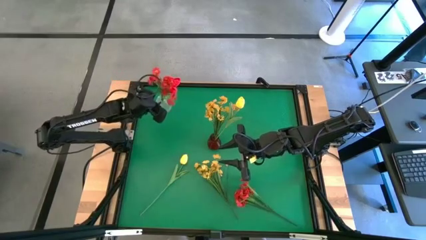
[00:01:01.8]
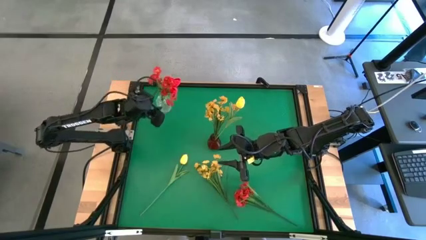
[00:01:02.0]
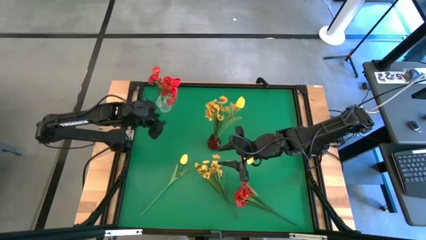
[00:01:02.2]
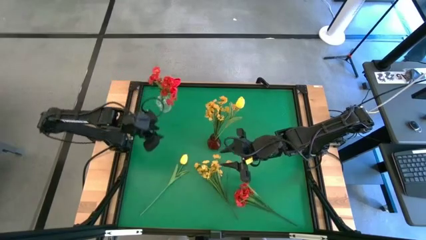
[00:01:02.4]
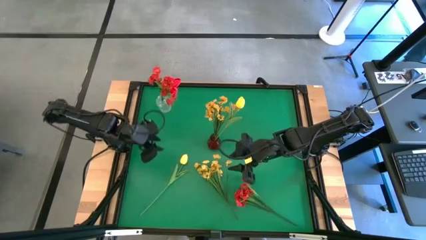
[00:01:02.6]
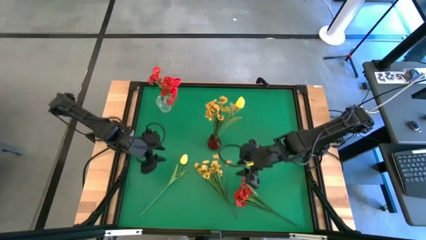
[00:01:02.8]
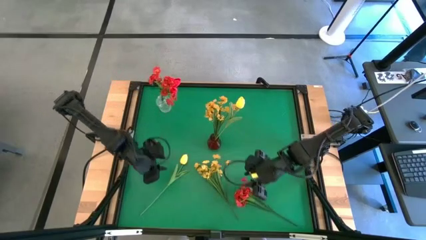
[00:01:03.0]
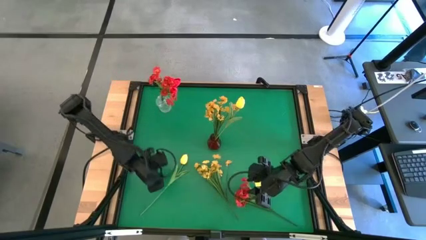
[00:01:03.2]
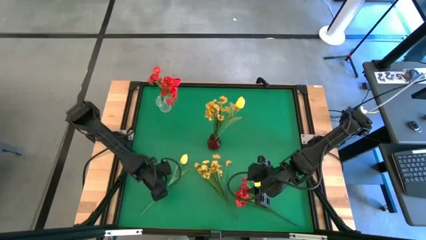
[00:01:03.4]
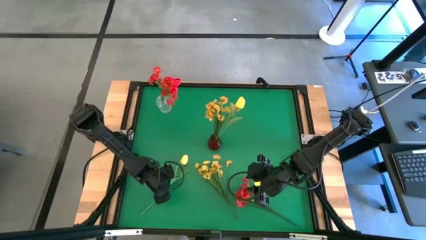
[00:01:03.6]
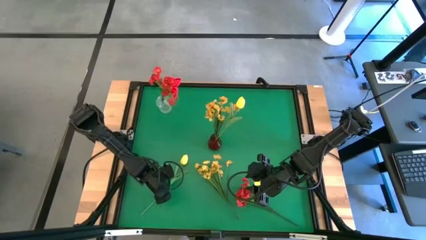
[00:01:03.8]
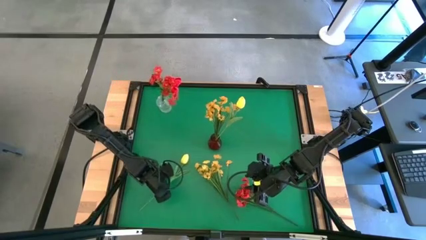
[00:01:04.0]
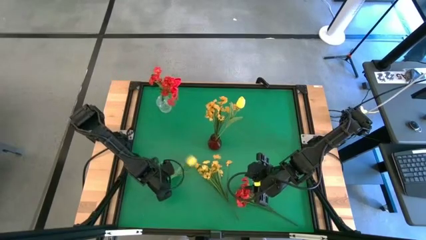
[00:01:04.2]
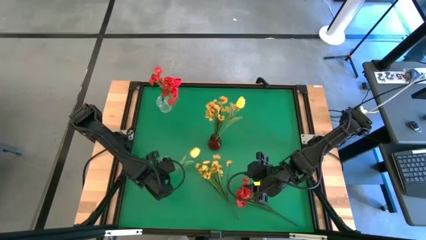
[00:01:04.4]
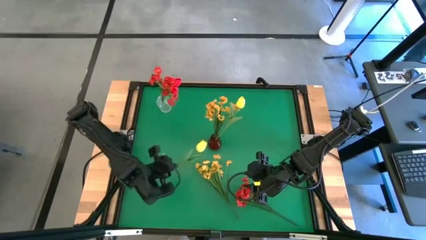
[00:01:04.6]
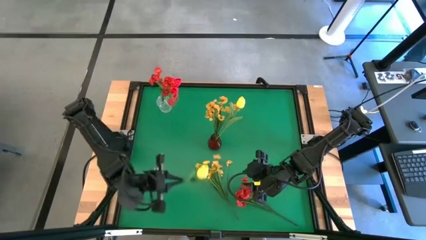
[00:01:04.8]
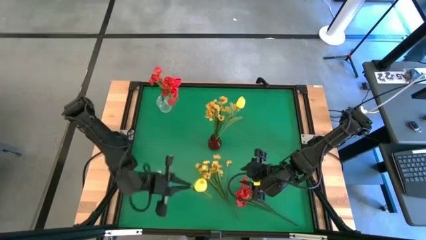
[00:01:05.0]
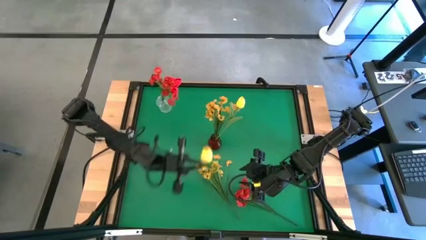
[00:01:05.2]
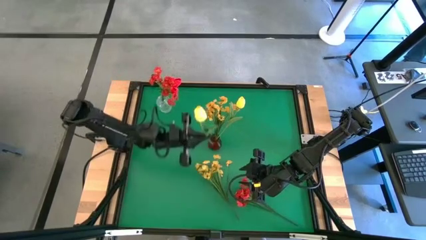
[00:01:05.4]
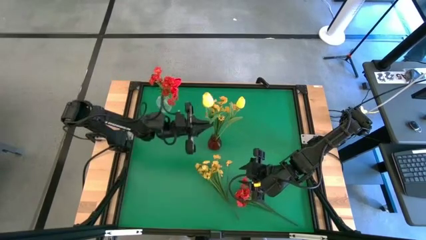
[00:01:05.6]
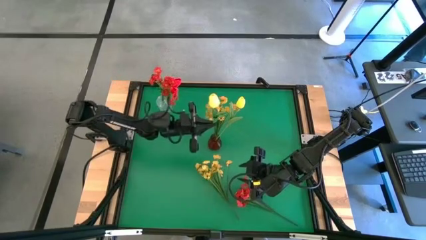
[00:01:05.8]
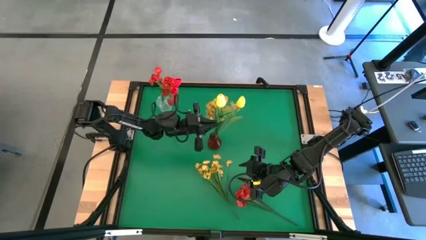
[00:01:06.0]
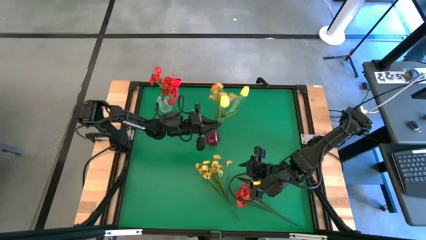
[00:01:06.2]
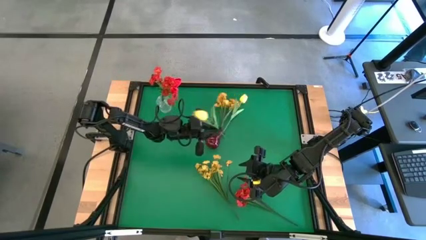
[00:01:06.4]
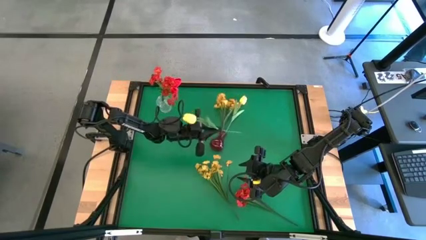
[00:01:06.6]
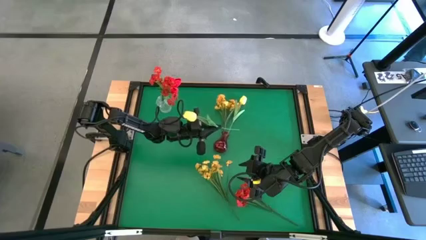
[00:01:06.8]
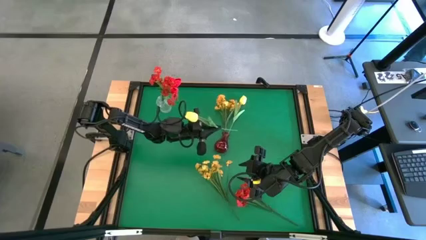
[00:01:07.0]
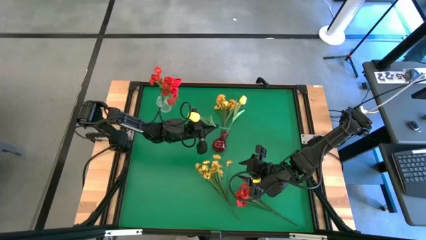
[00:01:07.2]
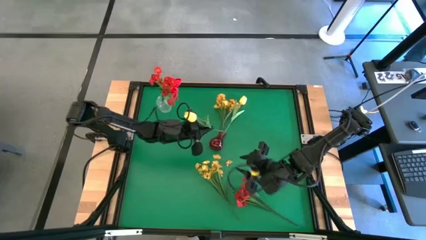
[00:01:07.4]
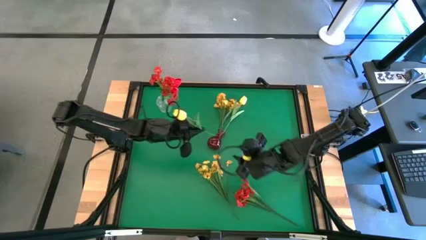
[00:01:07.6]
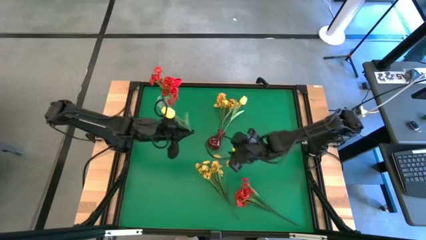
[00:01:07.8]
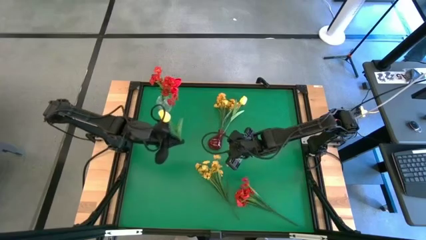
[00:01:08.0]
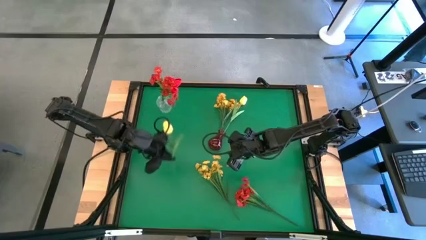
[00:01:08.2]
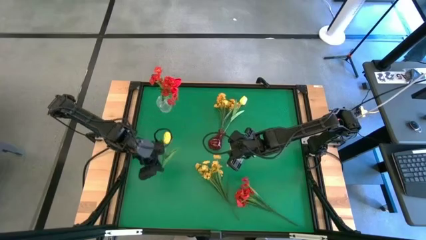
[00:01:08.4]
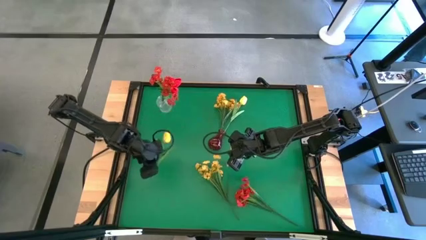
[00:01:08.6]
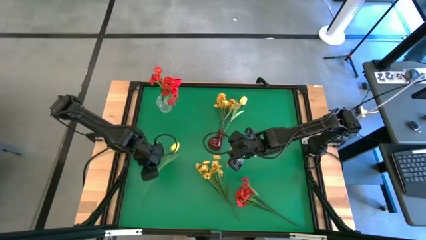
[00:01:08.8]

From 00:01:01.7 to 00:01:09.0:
Task: Sort flowers into vase by color
Put the yellow flower into the red vase

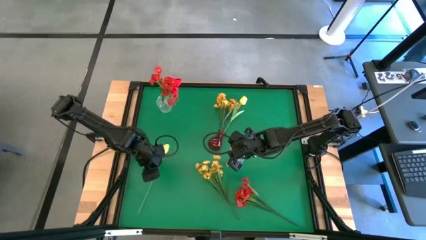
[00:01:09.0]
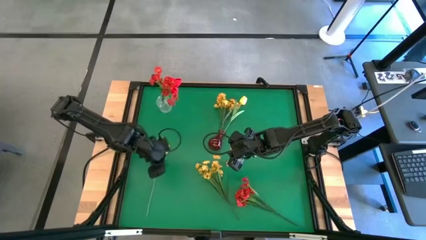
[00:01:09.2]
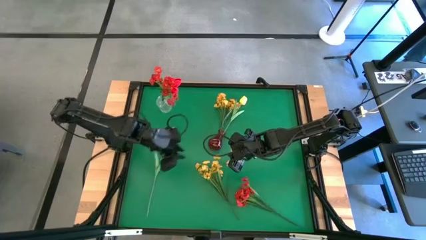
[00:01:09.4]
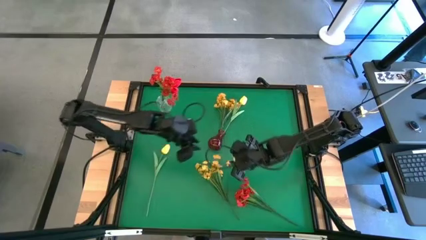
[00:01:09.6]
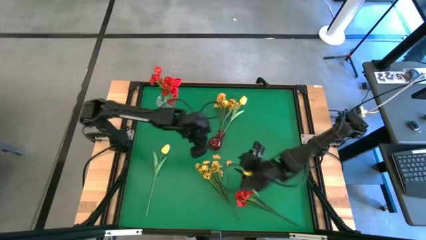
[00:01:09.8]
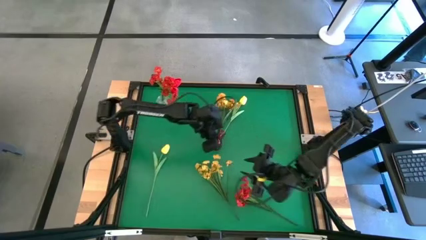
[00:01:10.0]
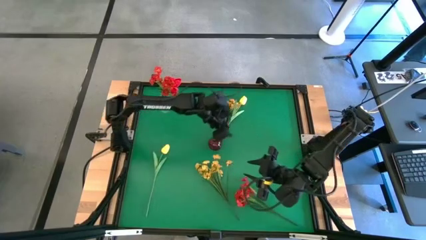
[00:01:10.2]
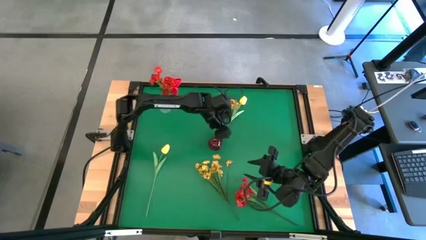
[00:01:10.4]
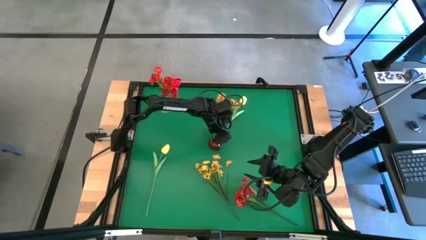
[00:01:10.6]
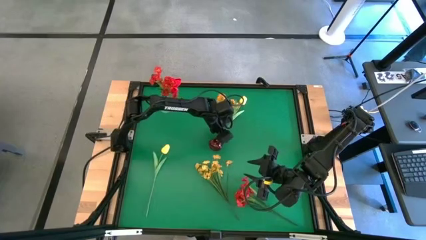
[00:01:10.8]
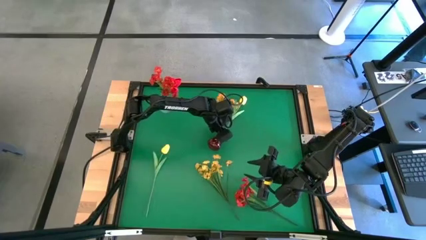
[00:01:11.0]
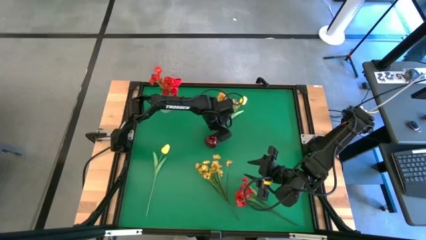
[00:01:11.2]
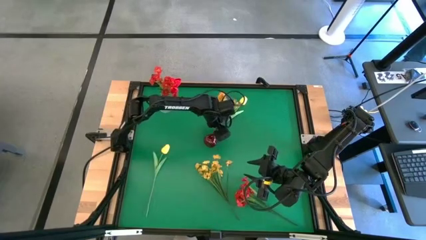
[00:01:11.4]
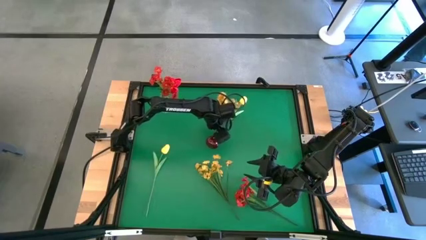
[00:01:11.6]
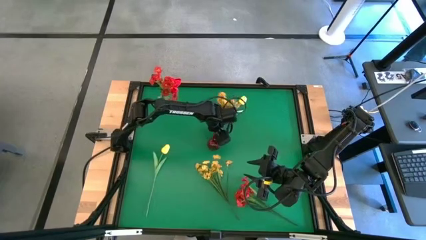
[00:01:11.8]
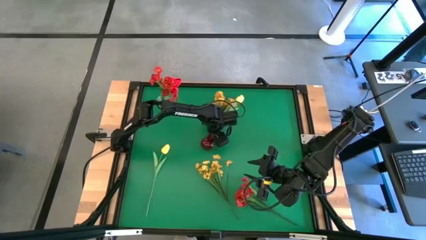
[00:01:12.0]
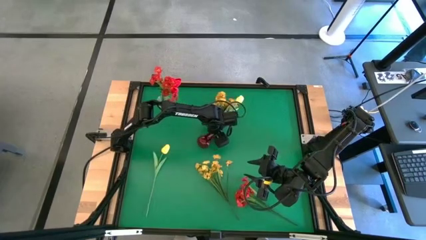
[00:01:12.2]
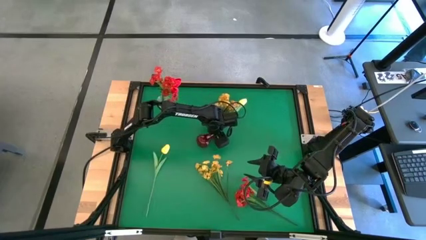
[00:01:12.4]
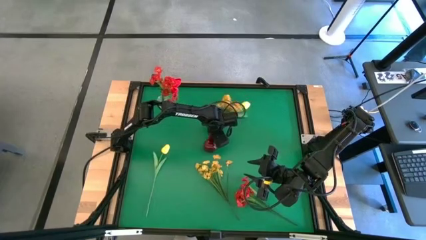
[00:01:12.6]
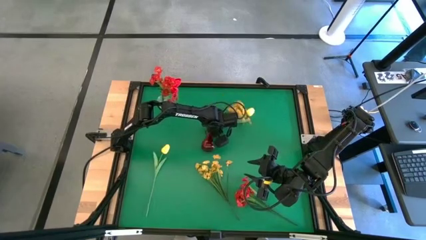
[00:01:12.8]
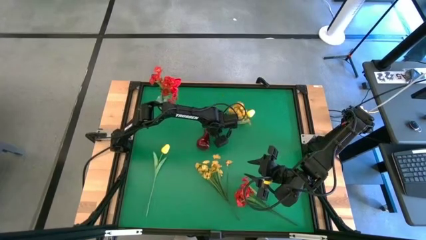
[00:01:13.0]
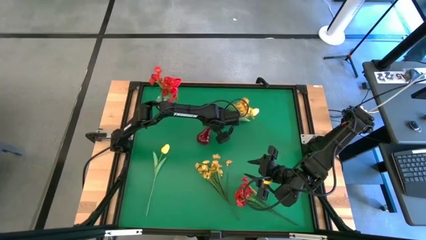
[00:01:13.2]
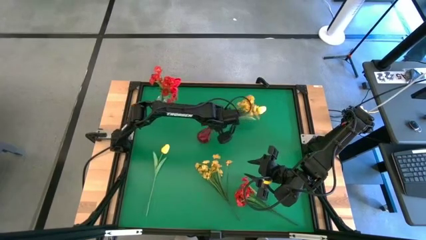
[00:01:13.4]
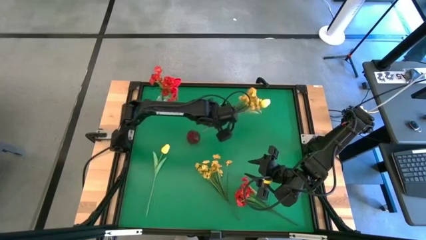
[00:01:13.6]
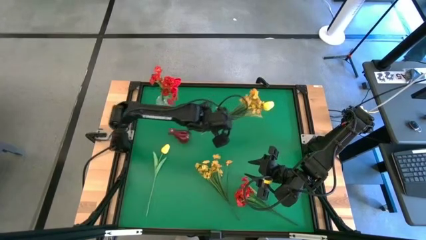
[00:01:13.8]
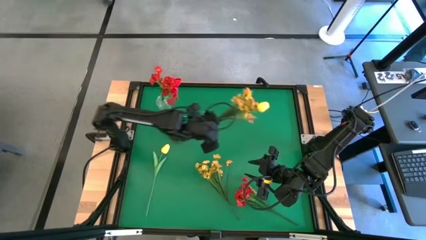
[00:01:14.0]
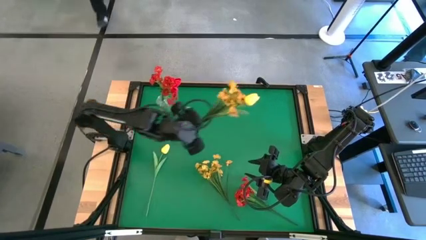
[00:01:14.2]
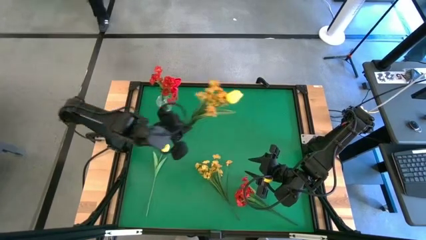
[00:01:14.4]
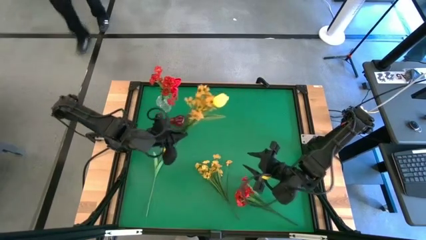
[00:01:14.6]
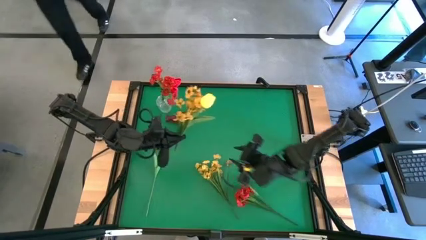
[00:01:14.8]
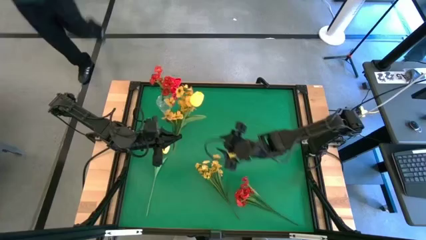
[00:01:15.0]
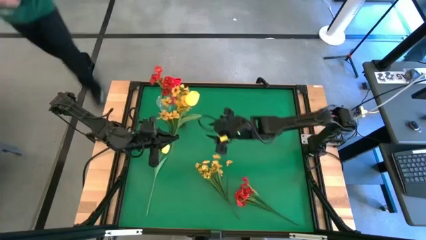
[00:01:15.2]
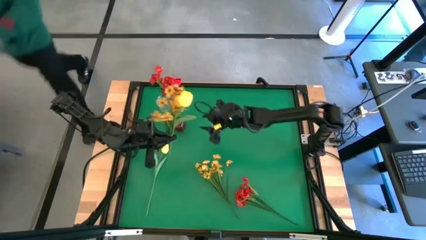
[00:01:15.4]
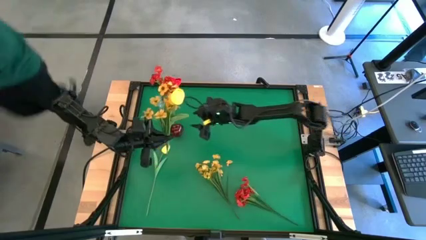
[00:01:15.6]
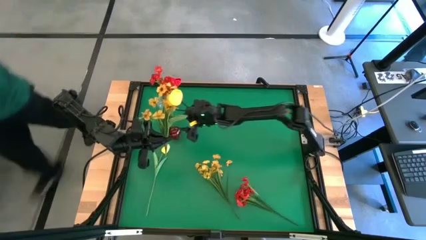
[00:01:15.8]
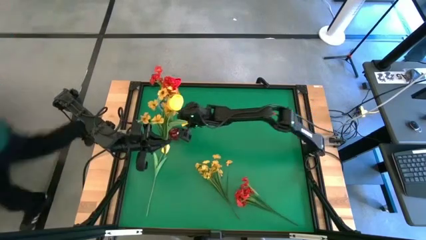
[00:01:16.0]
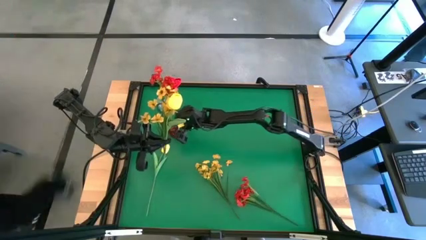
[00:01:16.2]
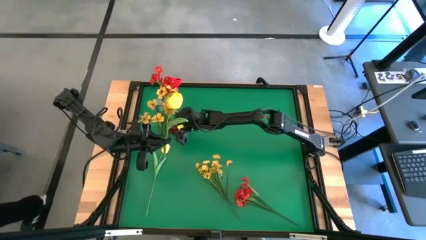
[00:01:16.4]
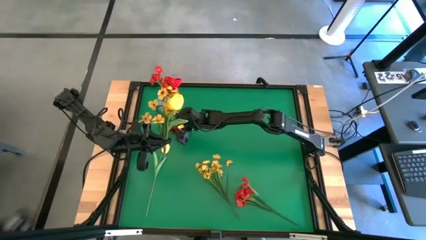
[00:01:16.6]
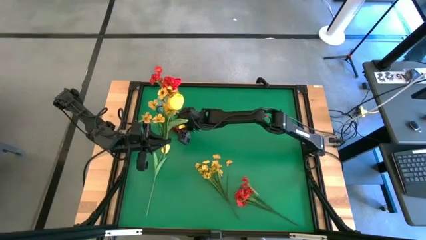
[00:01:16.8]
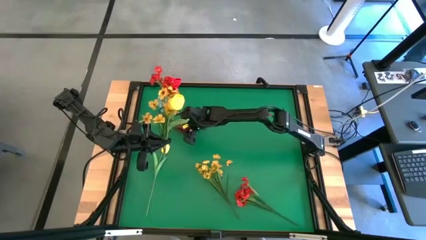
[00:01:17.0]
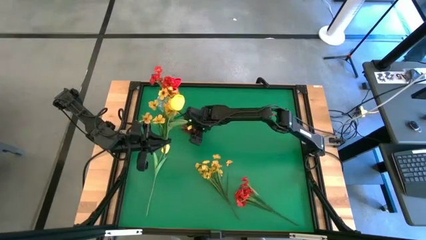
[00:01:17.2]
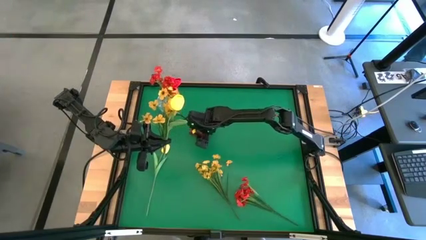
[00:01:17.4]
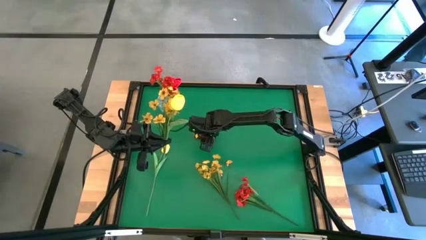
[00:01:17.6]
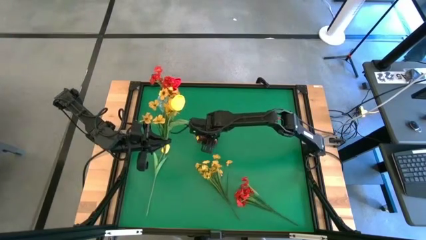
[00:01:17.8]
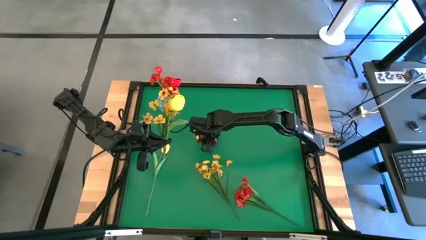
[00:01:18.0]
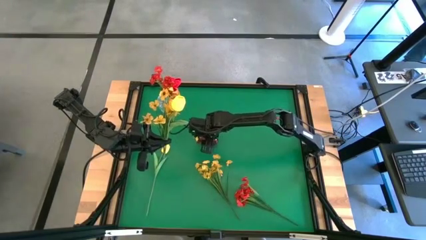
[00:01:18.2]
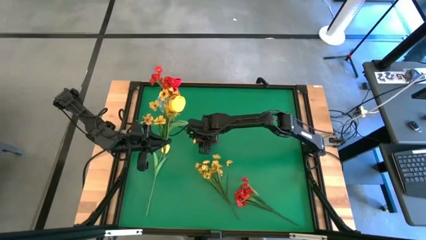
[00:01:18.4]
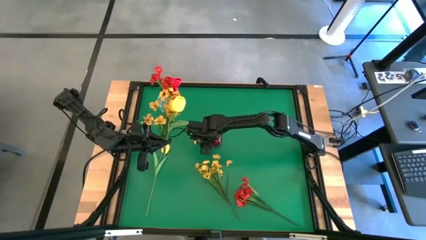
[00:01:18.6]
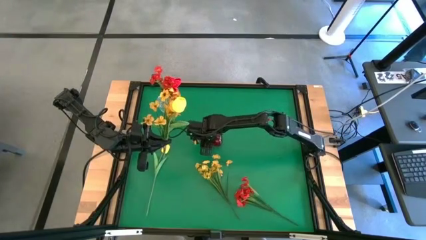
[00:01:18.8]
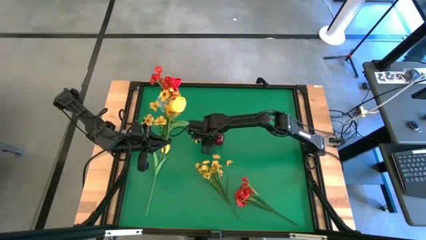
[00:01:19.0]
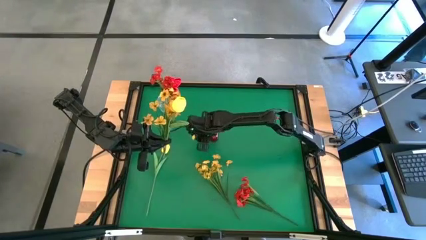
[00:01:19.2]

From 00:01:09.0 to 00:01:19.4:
Put the red vase containing the yellow flowers on the center of the table upright
